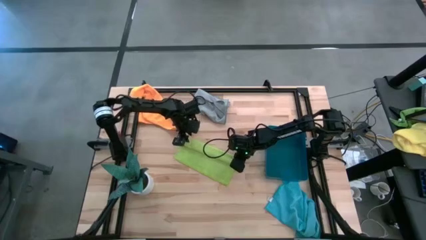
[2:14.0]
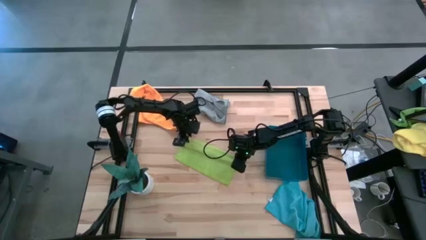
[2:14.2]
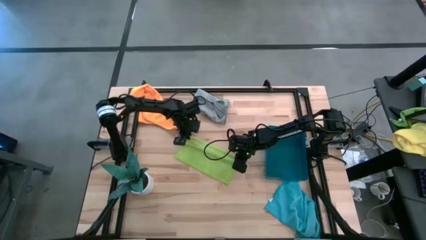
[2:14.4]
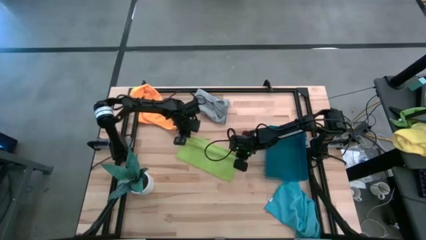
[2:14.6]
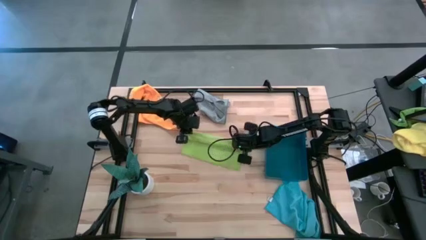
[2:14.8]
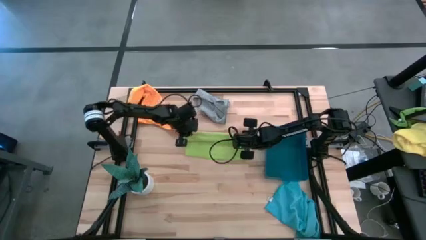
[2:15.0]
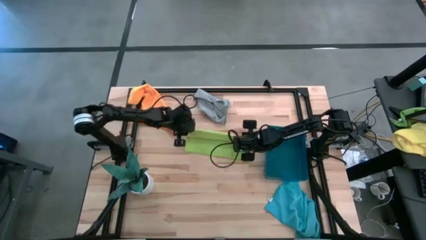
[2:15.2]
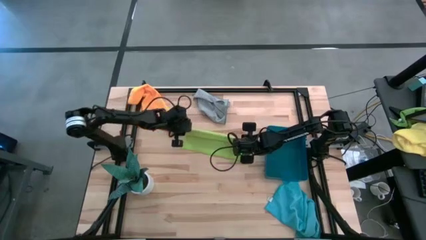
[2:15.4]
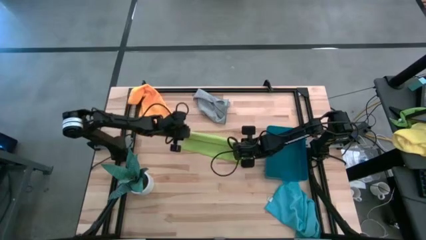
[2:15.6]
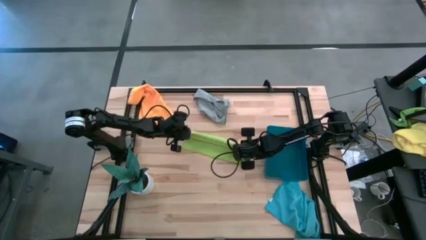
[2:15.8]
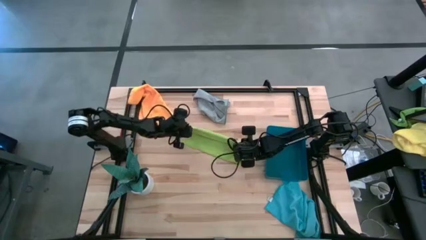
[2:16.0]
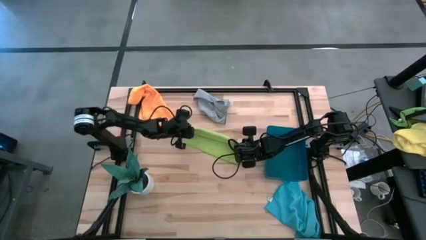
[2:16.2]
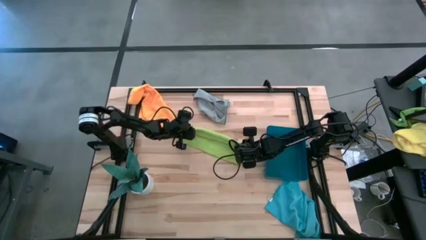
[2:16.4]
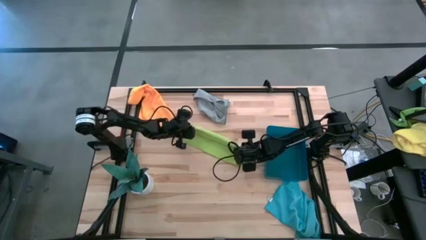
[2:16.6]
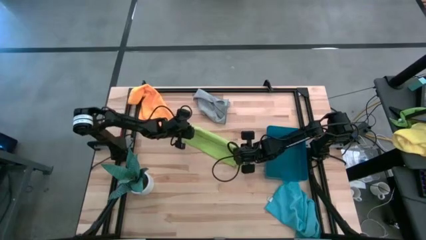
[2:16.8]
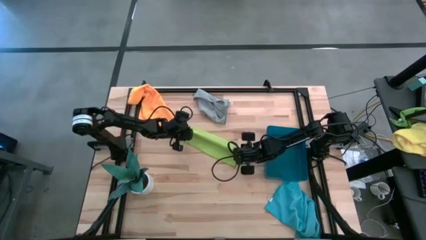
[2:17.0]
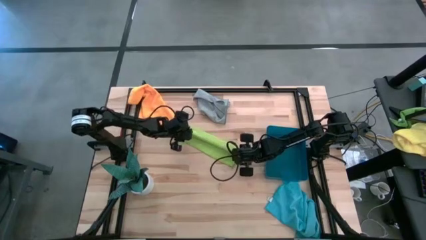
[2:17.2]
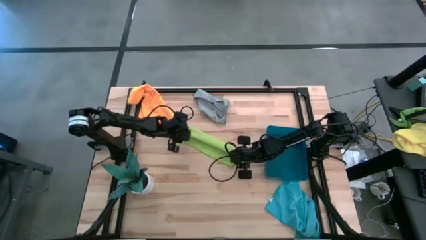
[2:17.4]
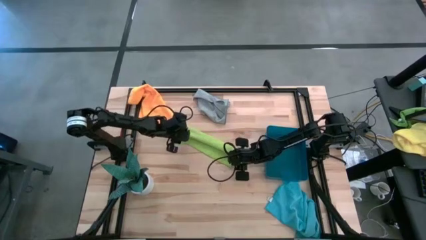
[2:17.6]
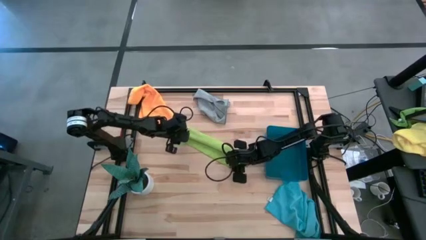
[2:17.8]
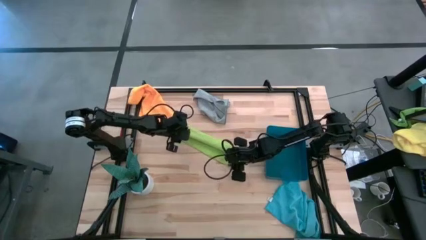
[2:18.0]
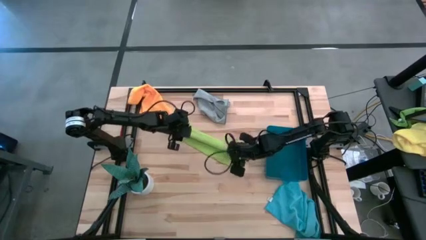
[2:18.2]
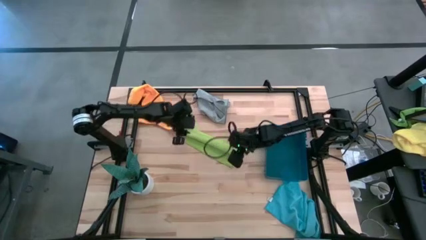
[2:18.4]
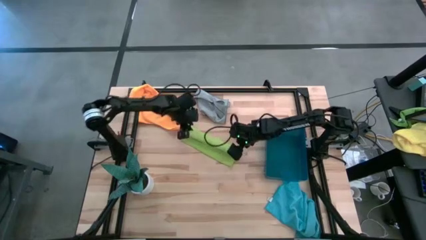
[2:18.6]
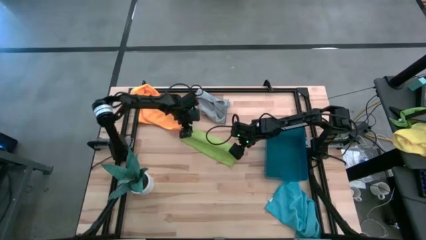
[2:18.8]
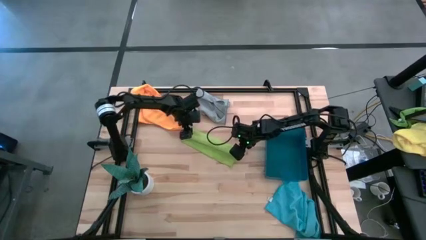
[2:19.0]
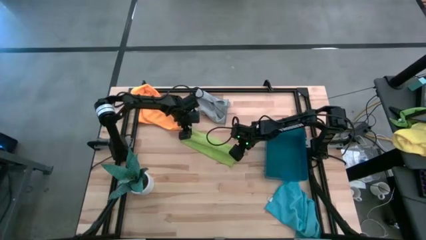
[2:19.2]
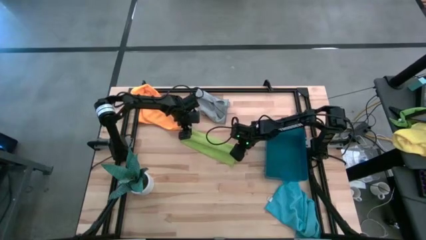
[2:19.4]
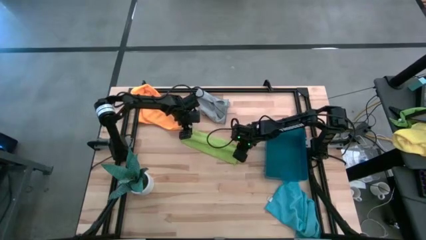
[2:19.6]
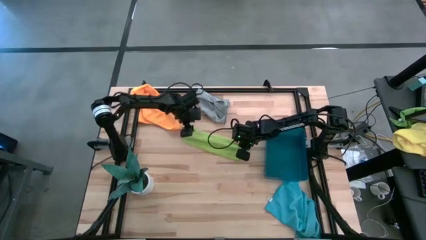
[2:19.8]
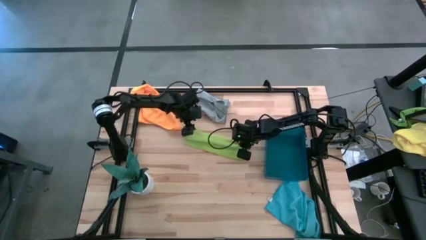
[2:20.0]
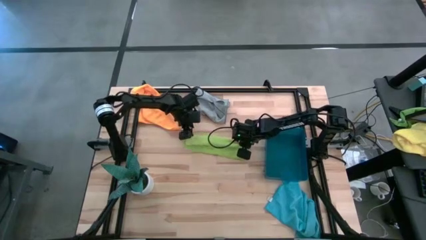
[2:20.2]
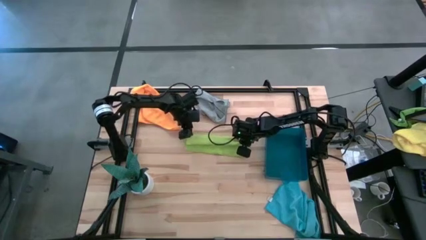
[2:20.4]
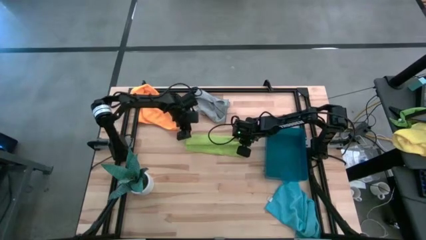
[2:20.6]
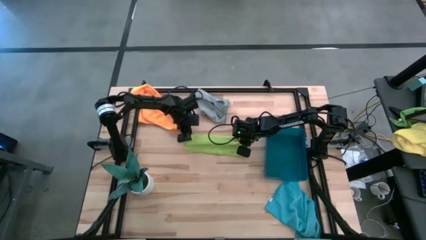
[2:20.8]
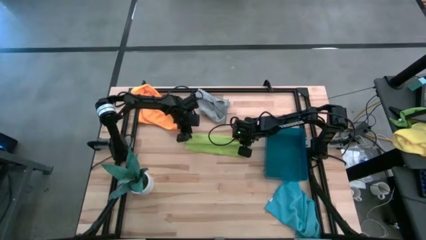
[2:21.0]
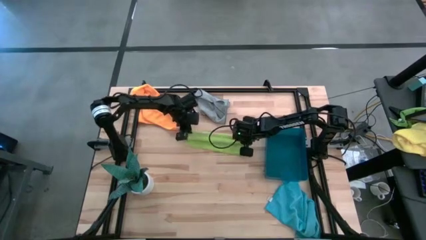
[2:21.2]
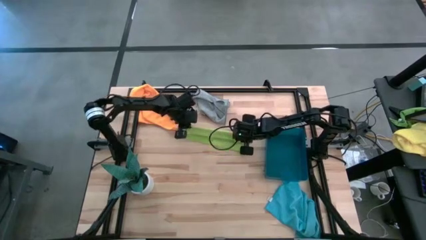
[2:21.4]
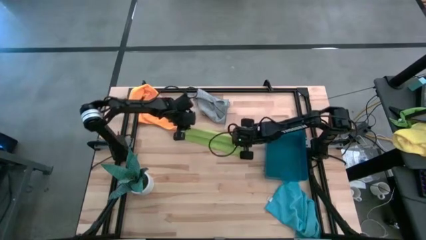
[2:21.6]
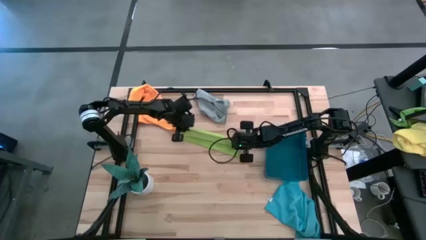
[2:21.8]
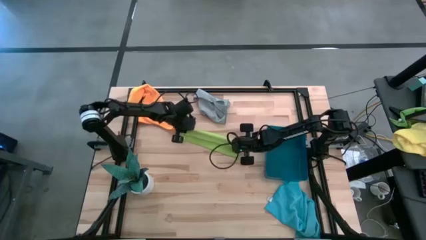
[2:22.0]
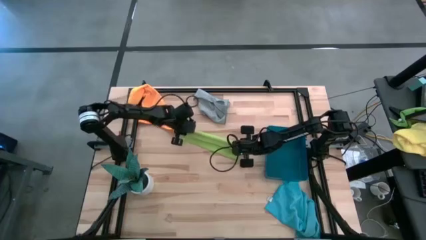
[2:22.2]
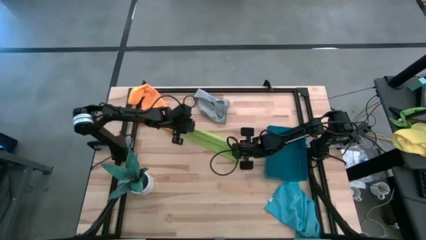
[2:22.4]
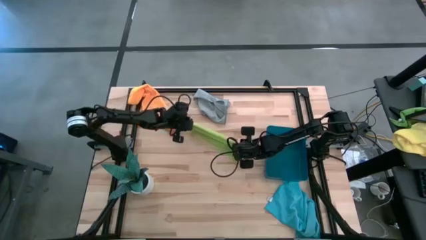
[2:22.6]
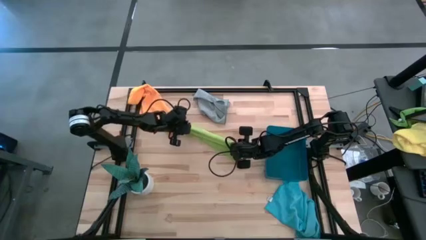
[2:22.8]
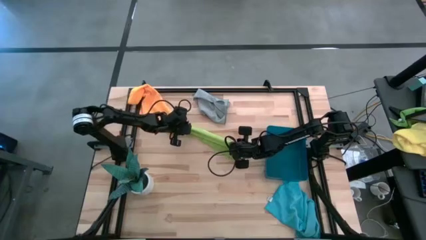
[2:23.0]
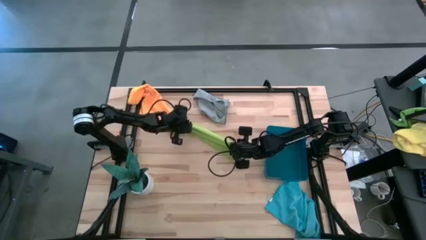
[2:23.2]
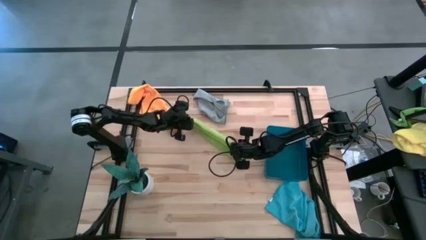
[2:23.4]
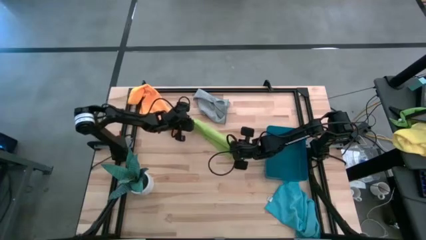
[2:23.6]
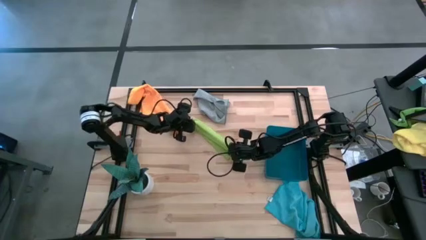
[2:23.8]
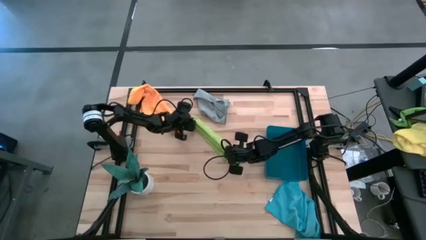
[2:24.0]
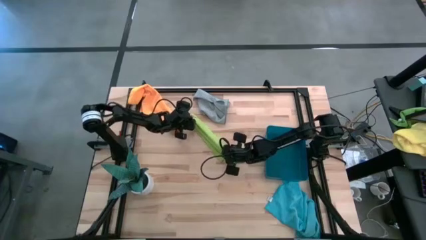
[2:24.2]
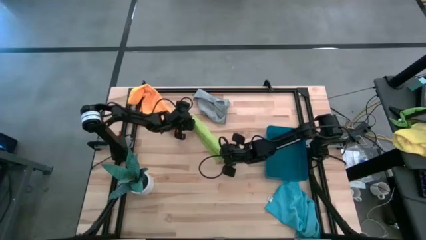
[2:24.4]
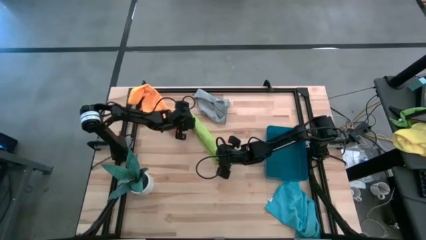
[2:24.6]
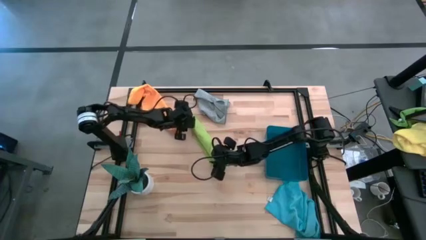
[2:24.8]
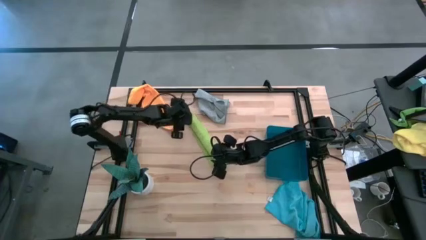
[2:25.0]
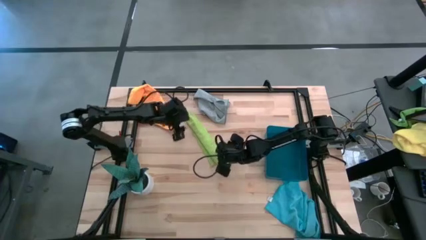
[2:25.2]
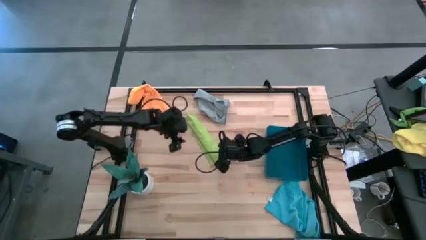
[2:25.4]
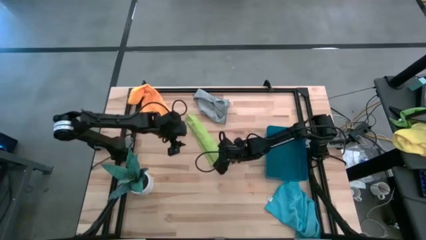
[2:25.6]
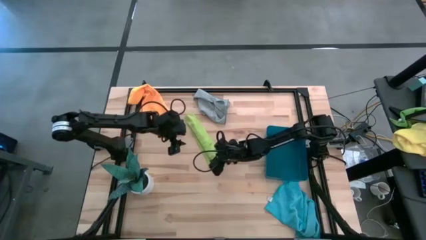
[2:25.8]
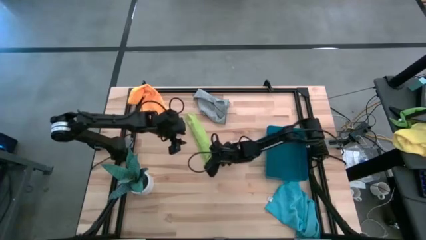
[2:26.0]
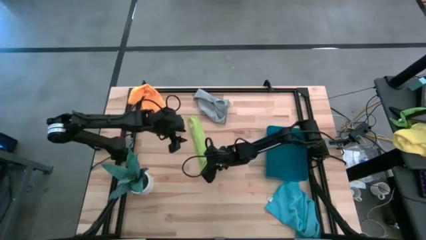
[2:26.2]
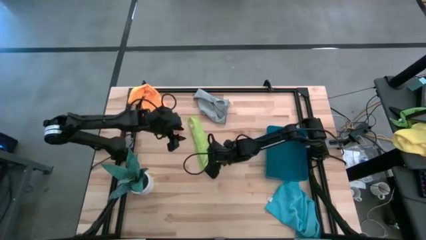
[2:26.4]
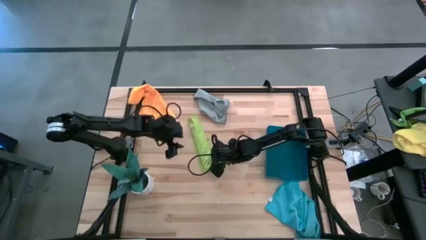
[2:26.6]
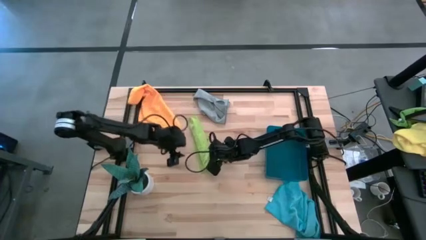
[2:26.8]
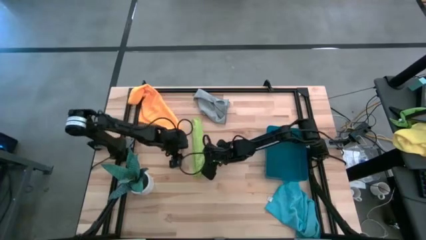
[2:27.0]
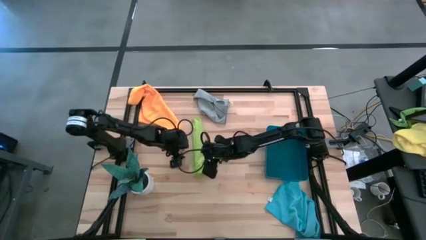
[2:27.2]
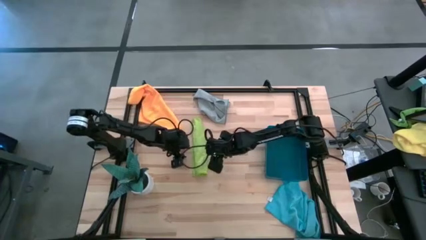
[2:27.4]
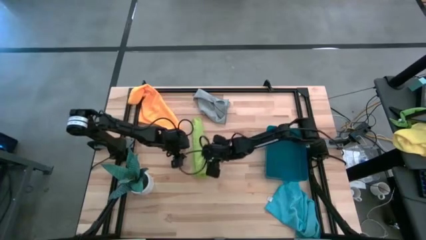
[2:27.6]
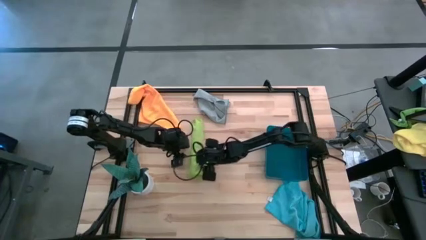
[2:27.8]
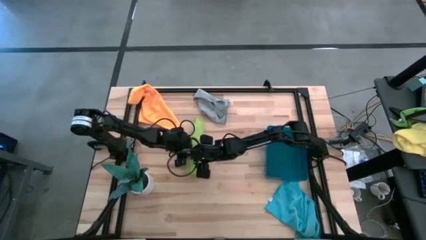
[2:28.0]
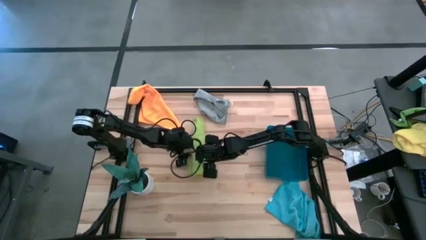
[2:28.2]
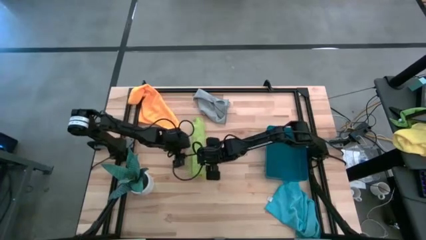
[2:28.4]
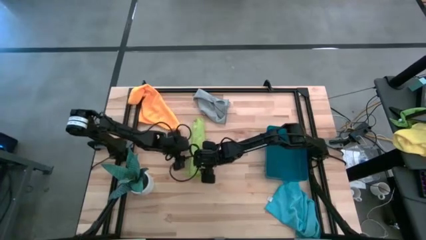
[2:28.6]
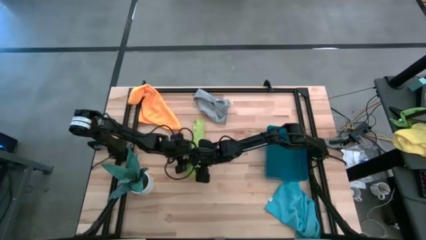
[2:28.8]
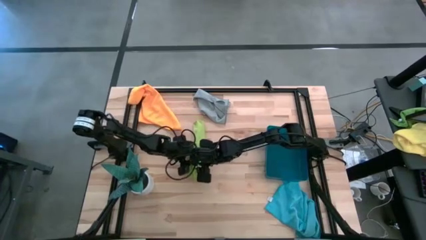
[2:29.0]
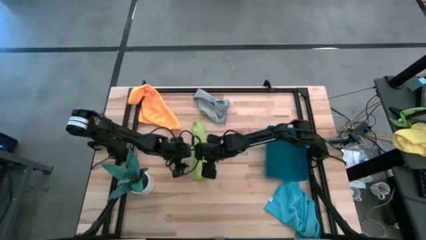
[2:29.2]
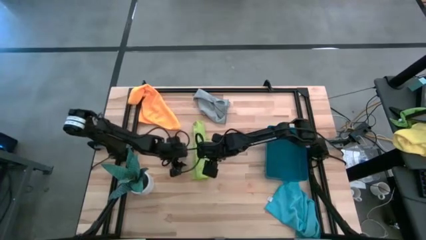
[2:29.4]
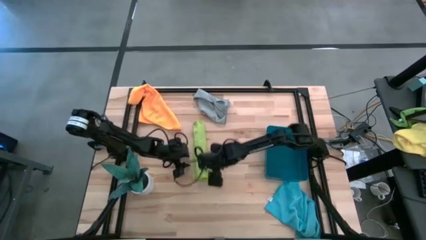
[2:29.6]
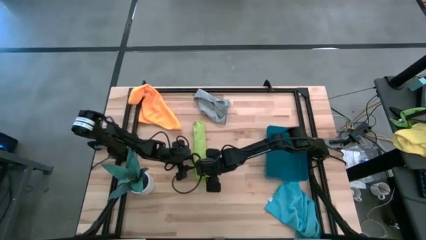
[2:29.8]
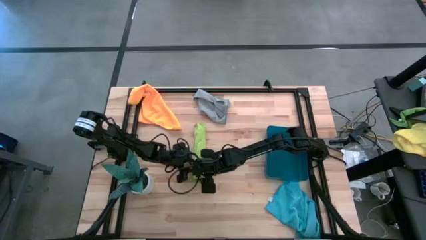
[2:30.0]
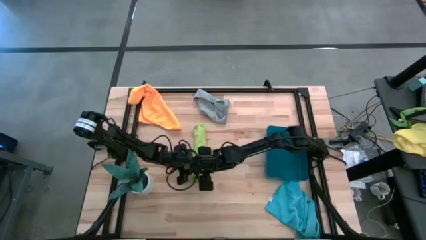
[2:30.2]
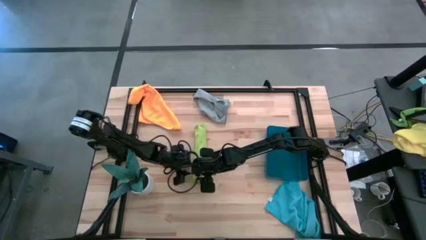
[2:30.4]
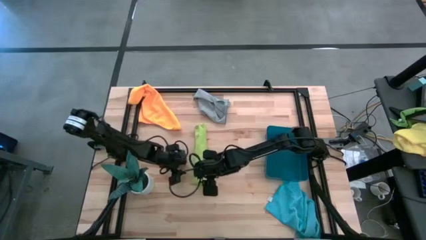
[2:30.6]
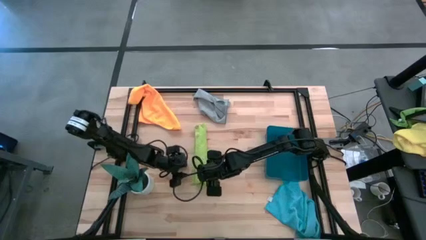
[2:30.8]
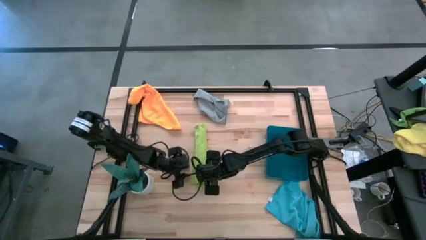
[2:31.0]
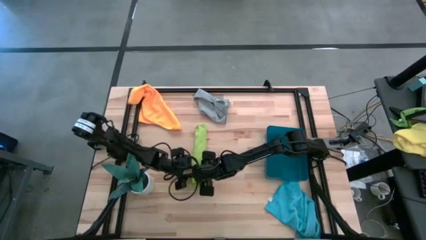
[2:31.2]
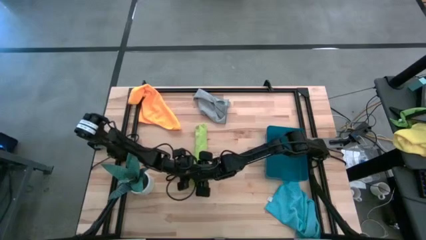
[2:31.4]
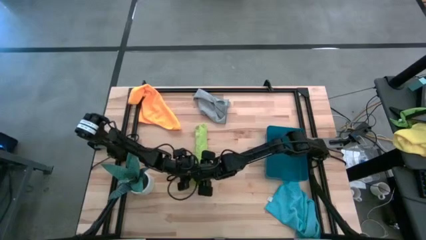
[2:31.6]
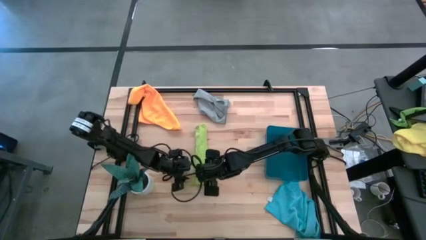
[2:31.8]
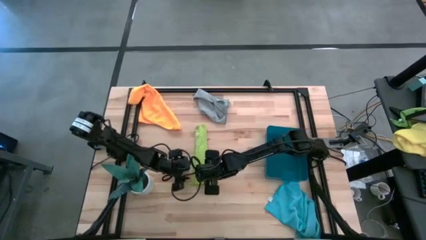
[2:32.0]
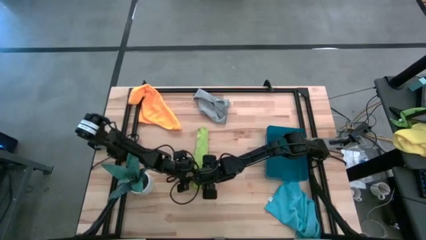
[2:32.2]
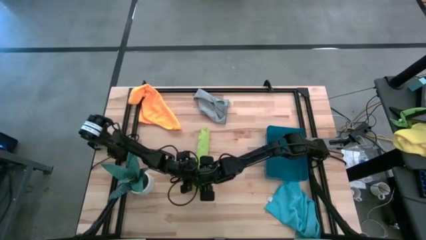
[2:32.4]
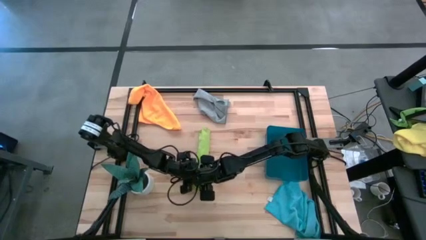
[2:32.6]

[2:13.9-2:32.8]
Task: Roll microfiber towels into tight, uniform cylinder then place into a basket
Roll the green towel
